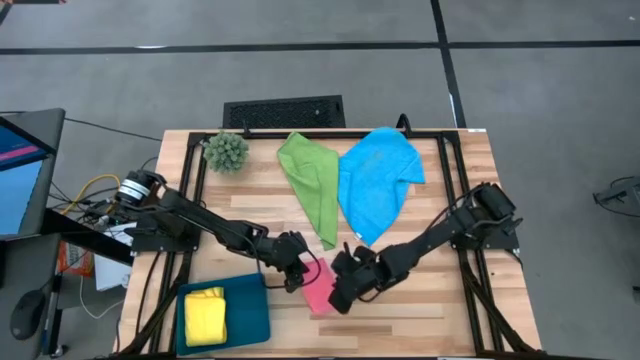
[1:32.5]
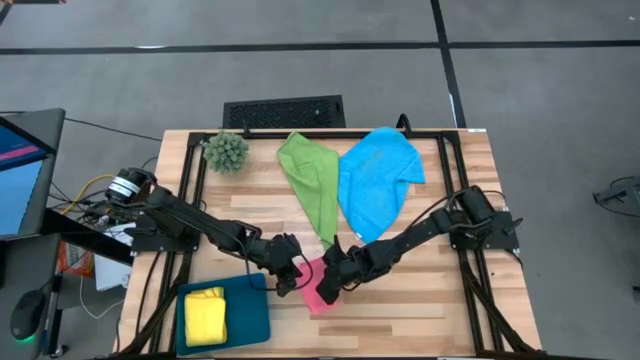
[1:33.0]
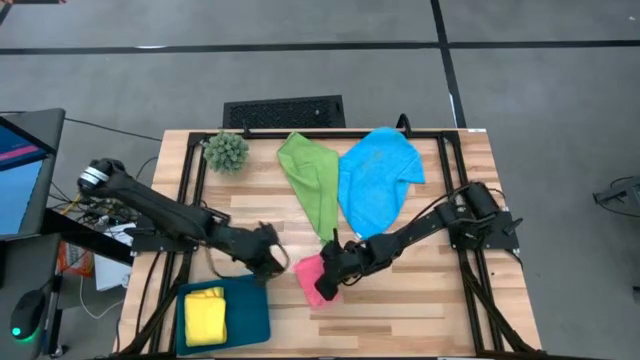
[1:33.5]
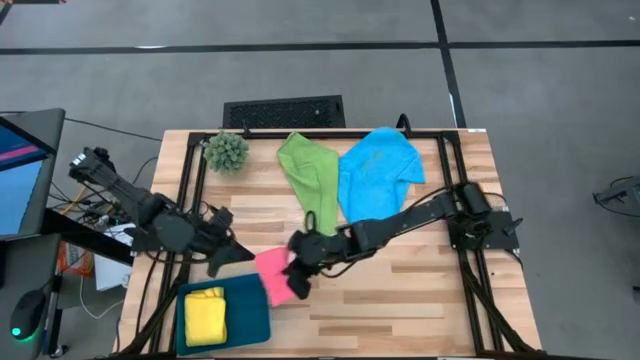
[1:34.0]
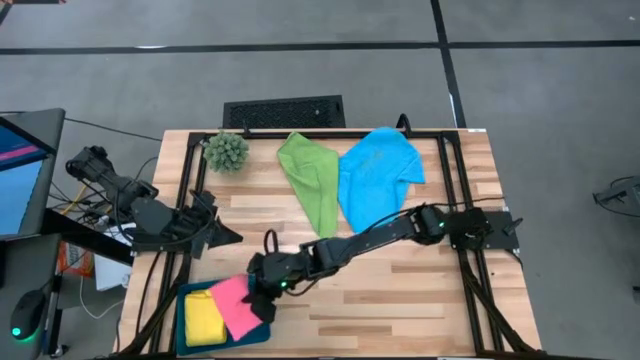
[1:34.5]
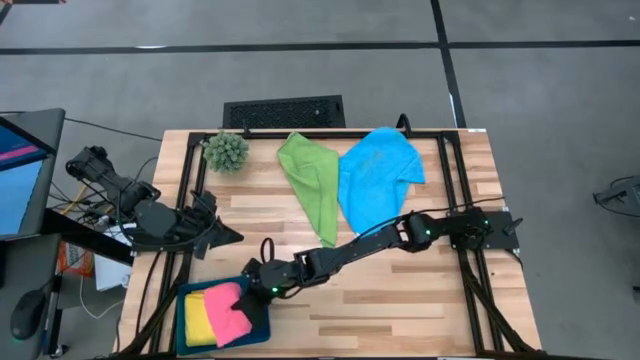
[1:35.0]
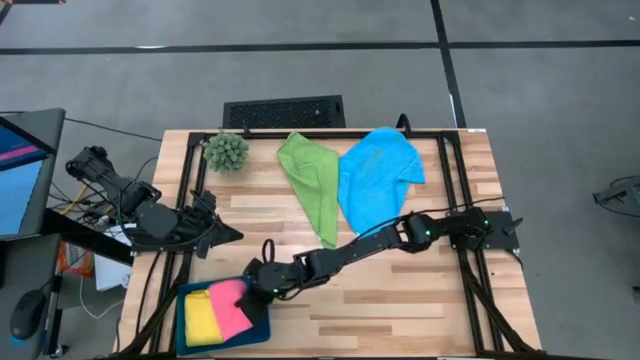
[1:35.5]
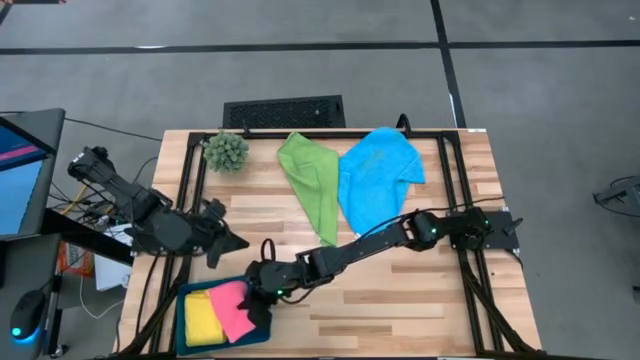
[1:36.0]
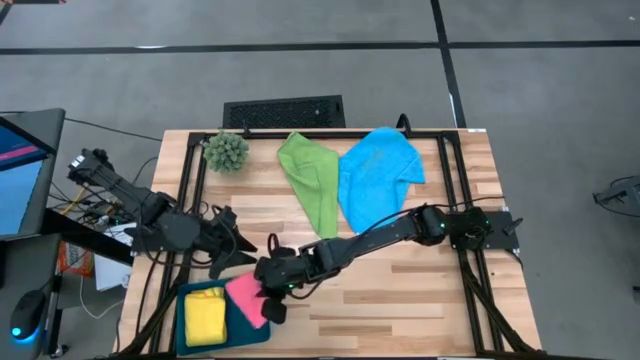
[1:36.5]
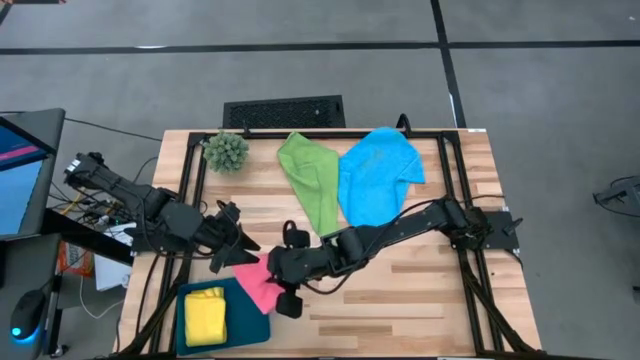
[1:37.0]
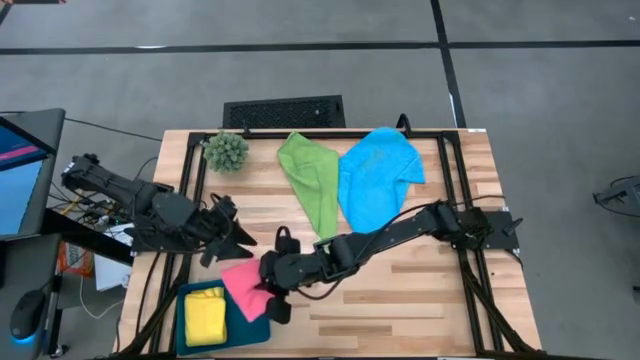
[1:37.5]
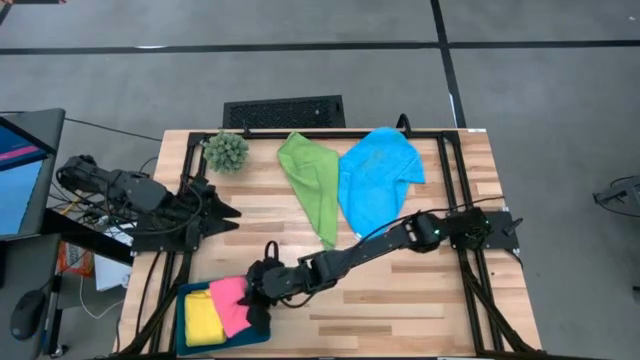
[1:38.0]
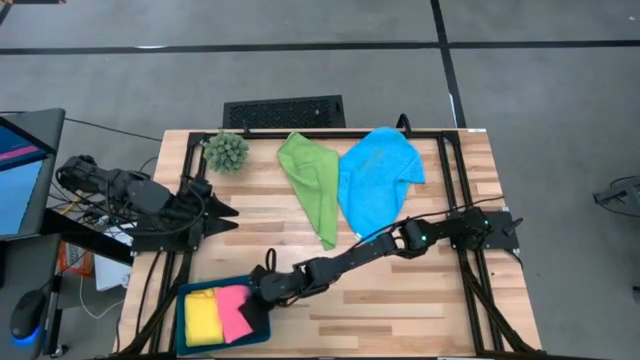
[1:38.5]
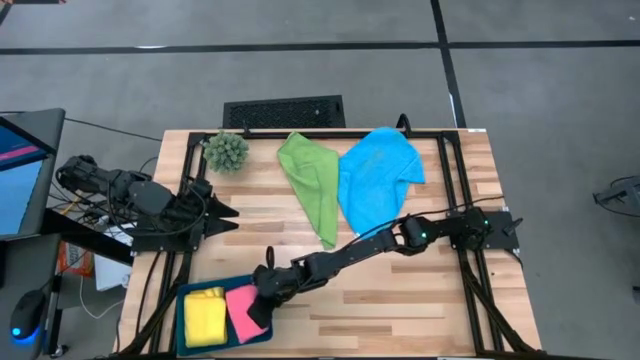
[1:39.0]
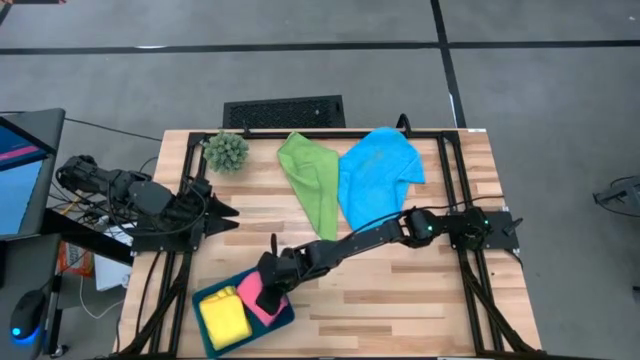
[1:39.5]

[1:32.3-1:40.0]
Task: Fold microfiber towels
Put the red microfiber towel into the bin

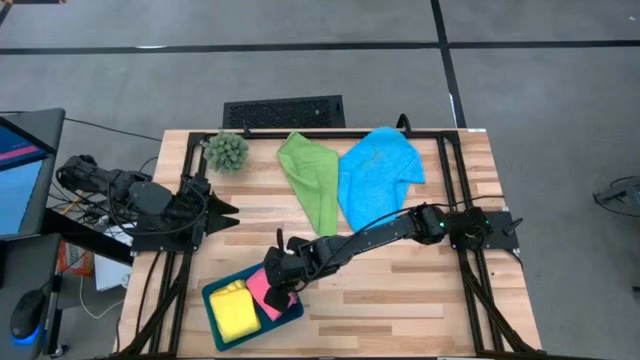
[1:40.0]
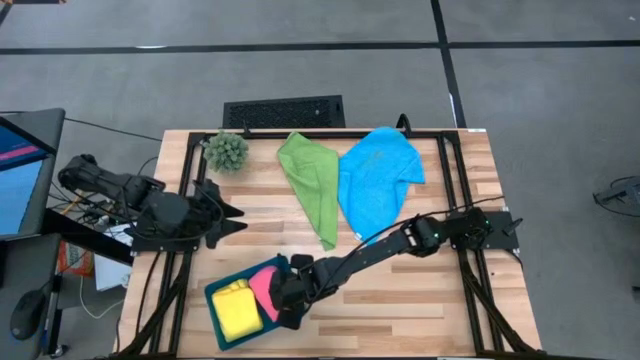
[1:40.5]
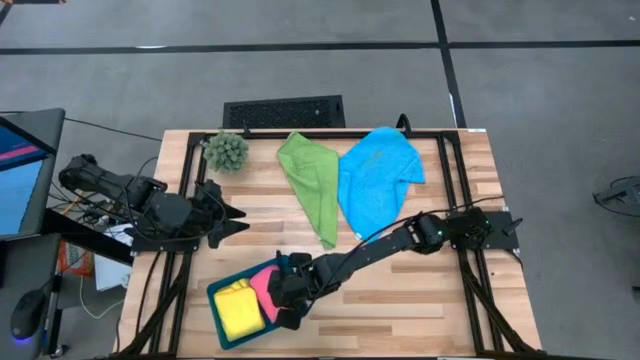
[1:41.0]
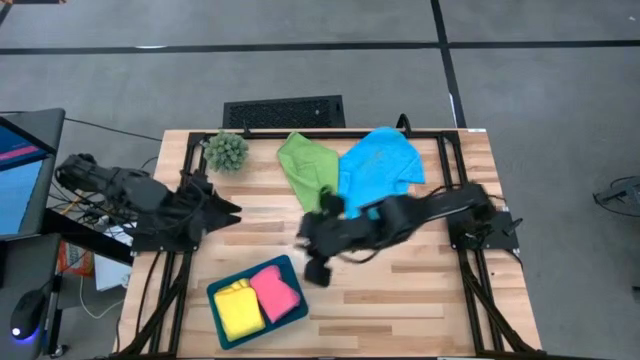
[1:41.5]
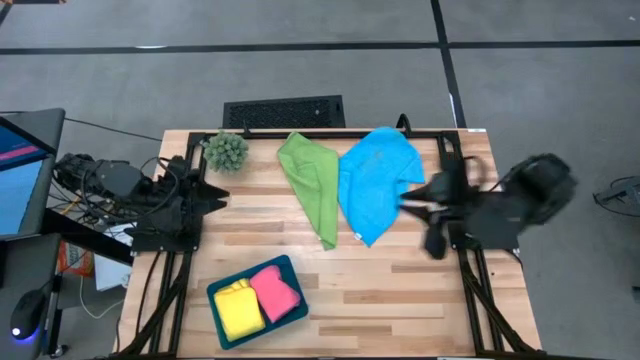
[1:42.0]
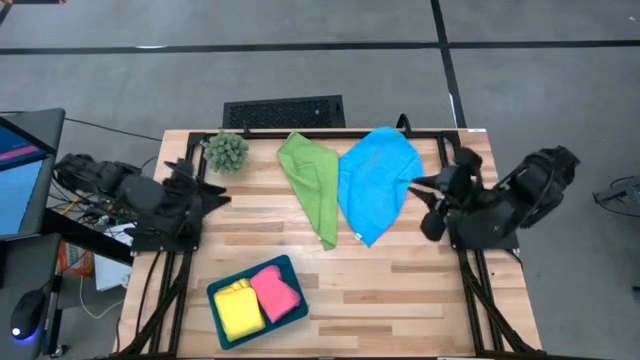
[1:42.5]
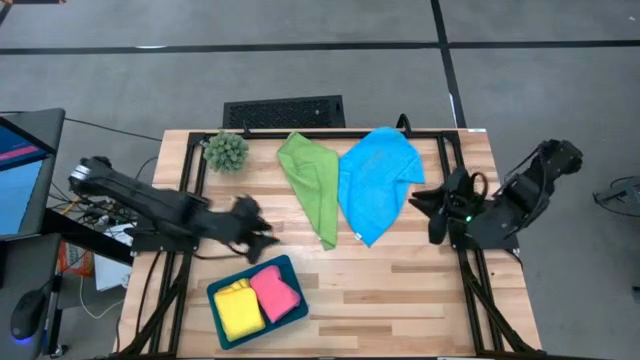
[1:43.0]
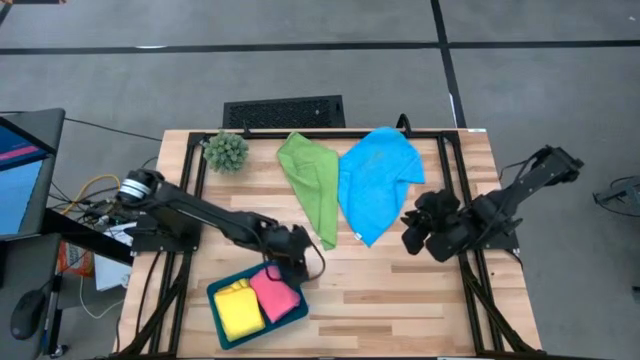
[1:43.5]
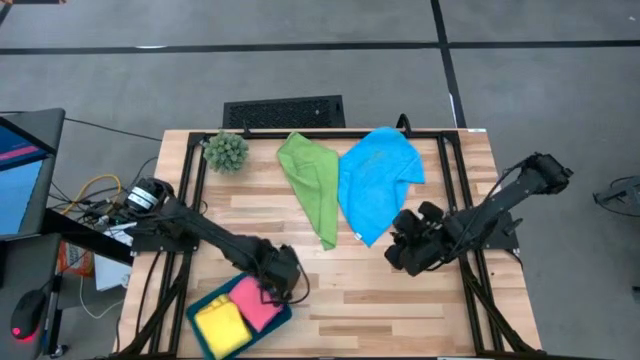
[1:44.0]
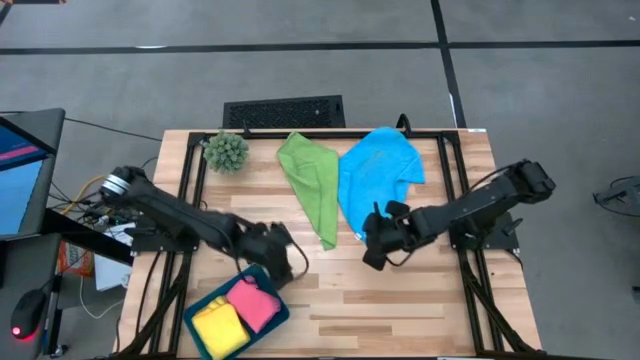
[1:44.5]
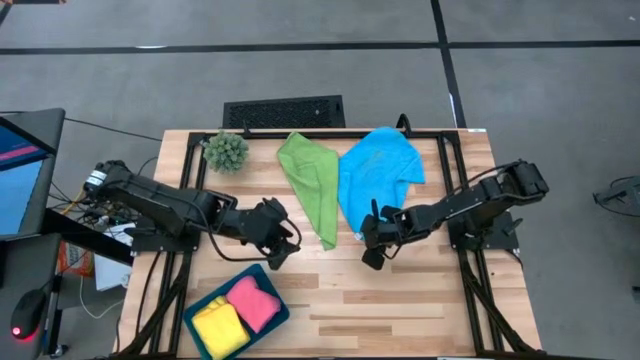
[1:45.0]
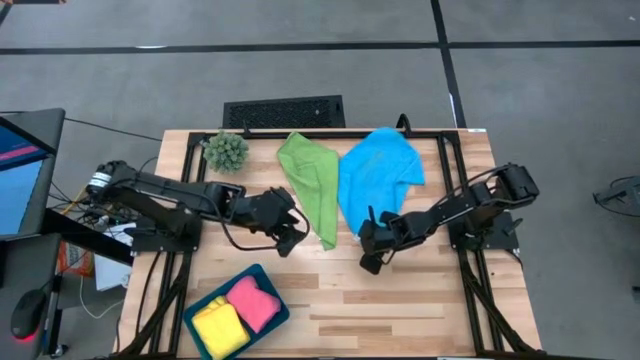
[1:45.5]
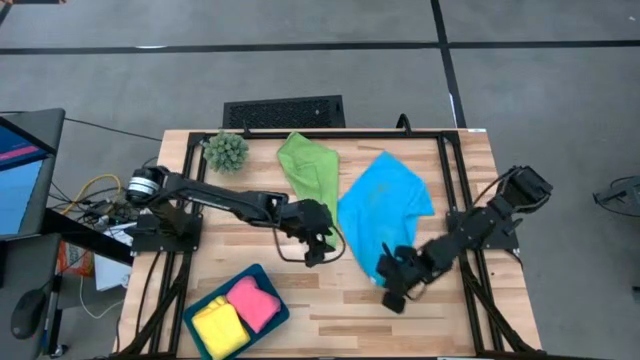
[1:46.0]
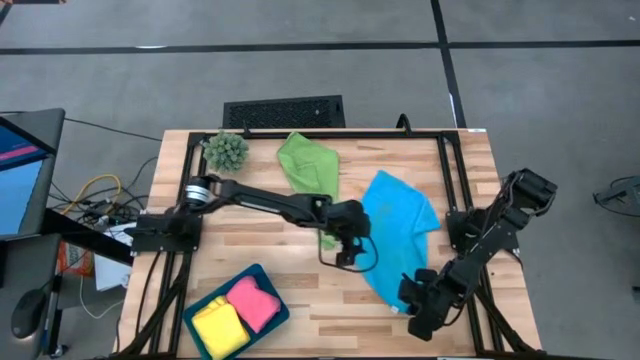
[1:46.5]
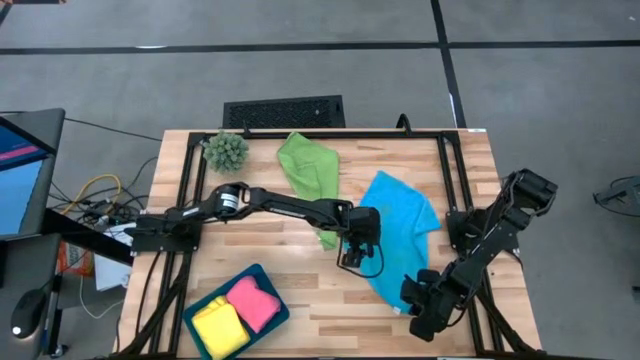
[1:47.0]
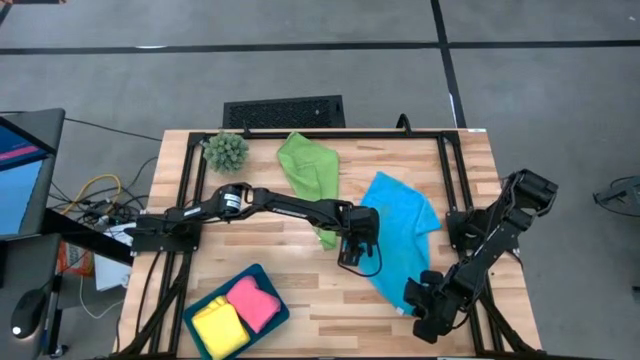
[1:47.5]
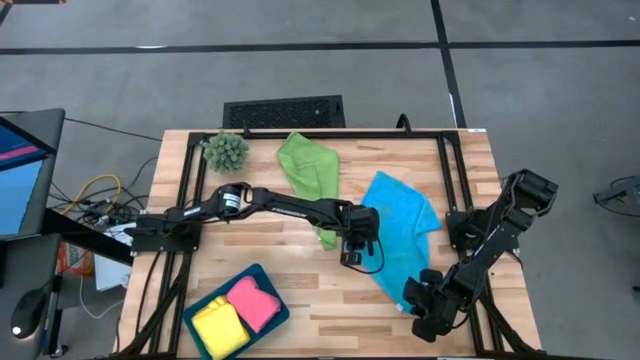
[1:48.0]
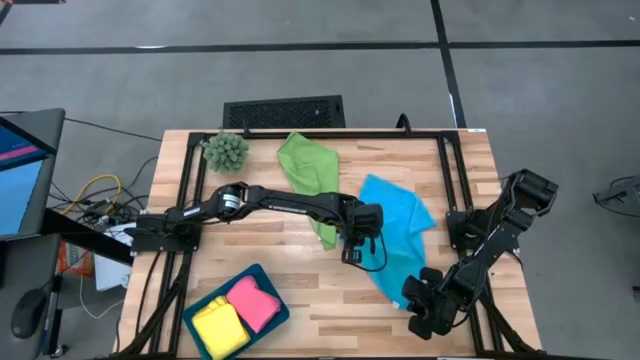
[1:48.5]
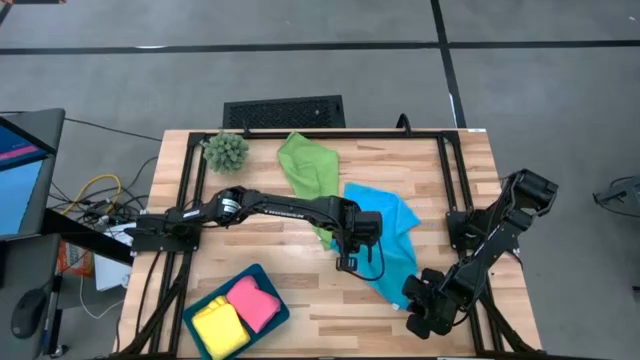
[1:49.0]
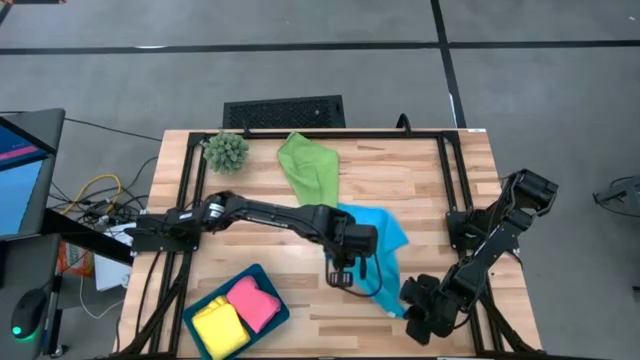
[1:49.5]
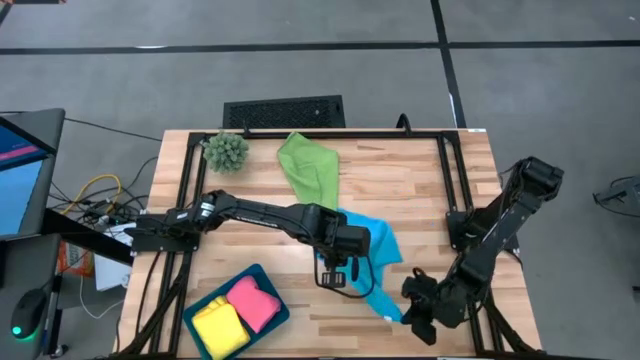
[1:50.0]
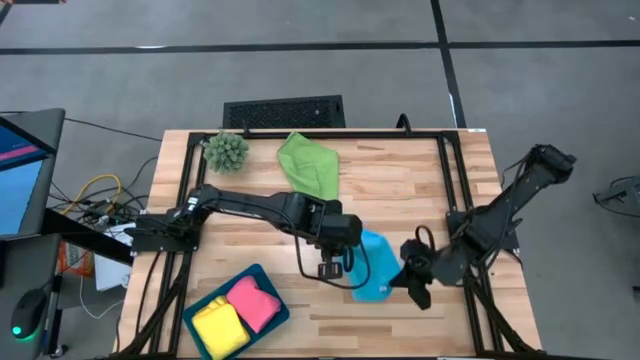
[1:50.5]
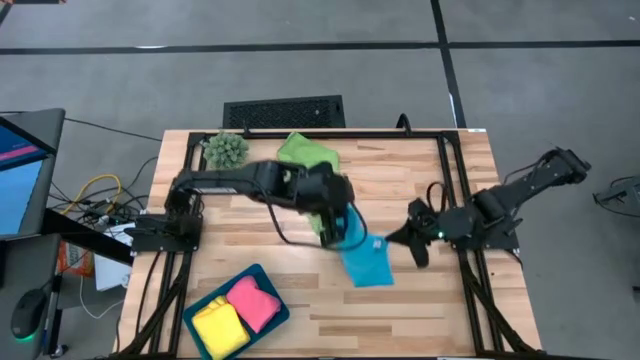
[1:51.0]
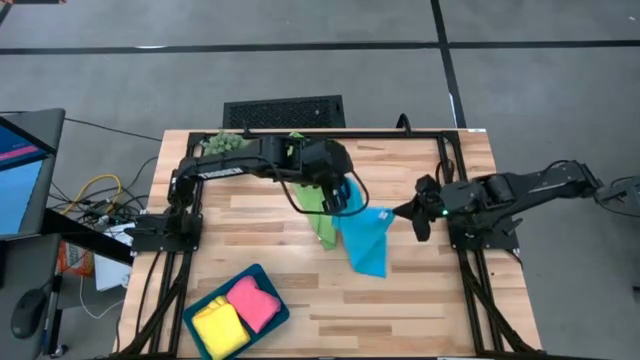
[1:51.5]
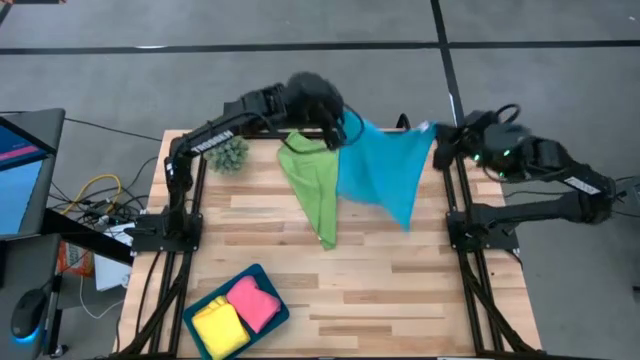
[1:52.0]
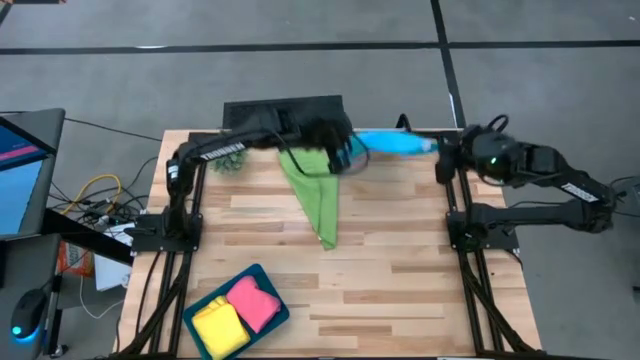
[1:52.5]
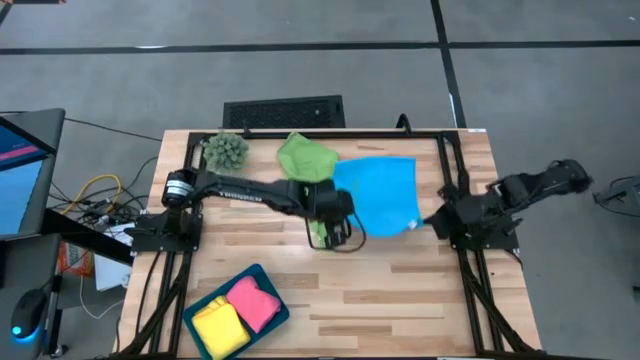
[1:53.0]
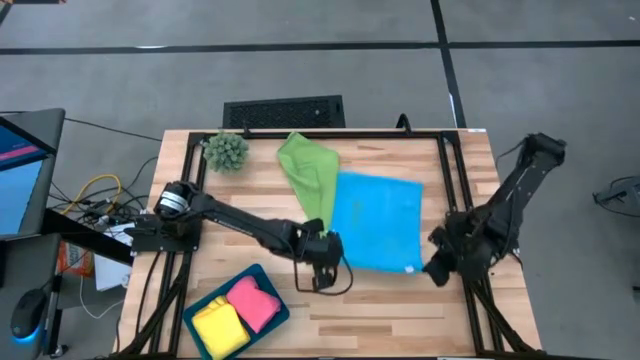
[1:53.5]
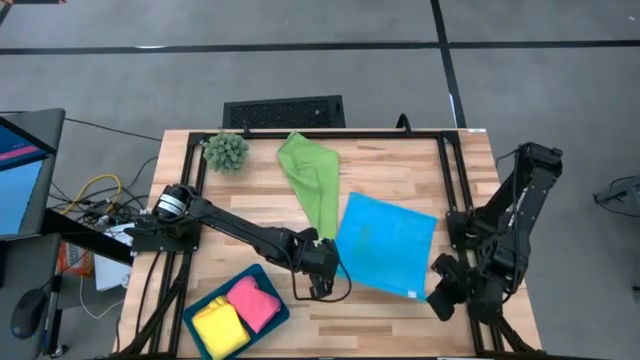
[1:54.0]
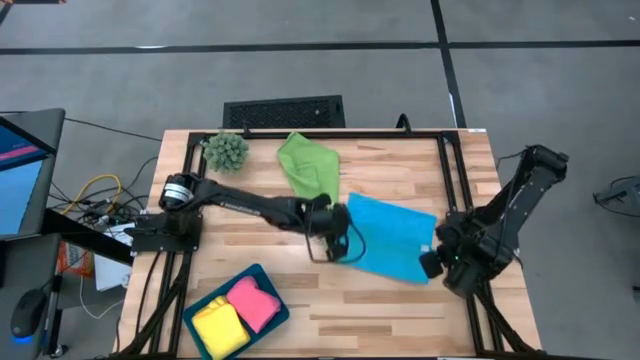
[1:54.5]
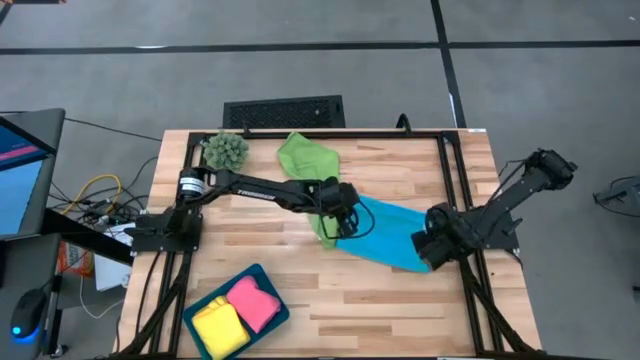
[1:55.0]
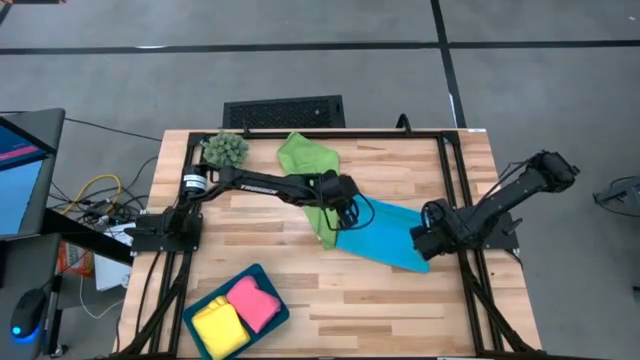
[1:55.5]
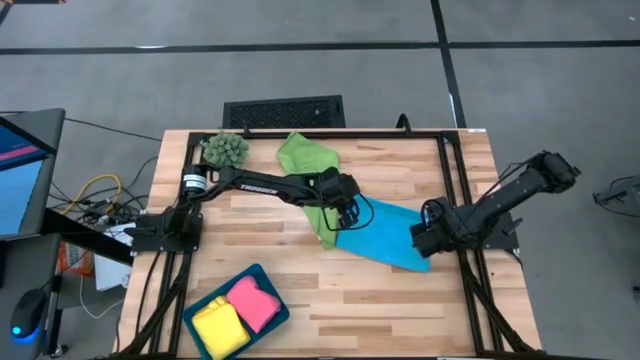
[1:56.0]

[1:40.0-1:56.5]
Fold the blue microfiber towel
